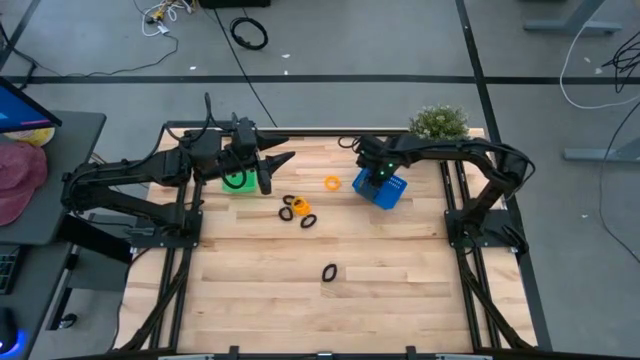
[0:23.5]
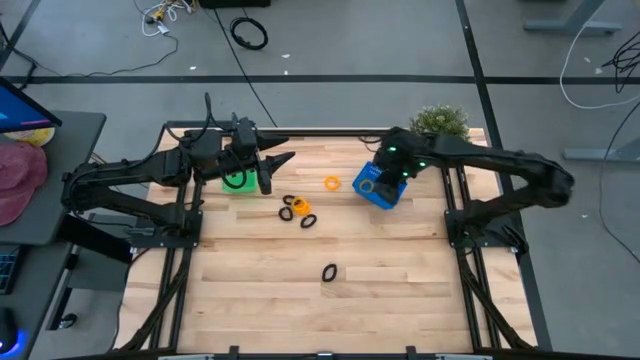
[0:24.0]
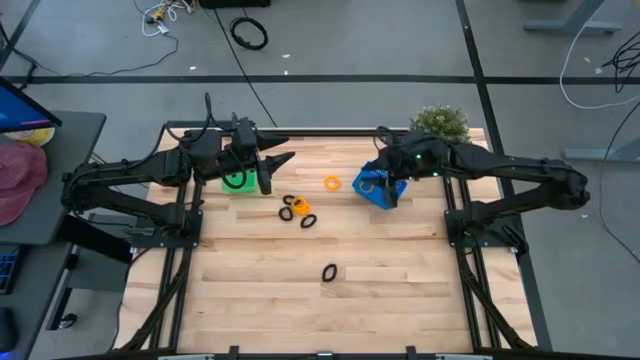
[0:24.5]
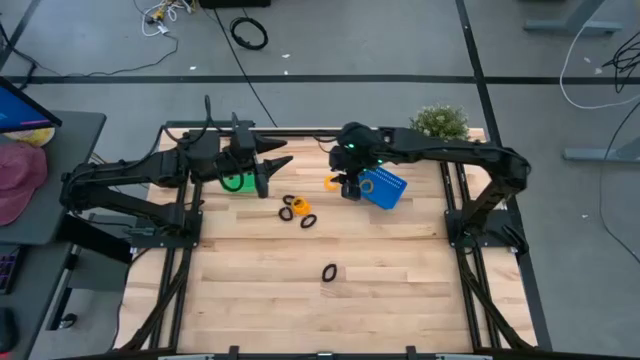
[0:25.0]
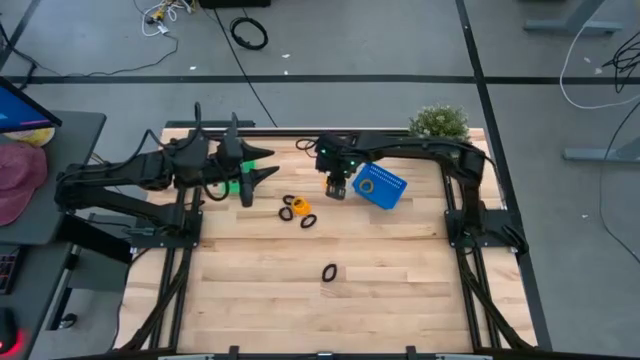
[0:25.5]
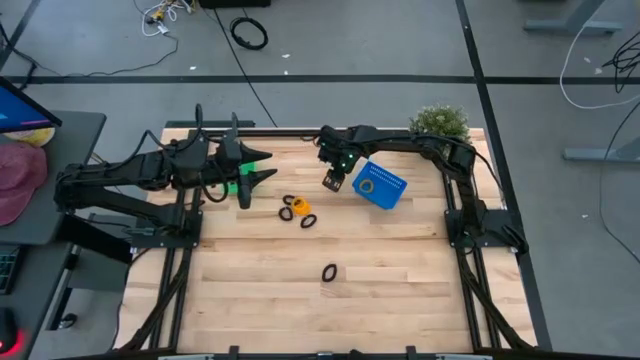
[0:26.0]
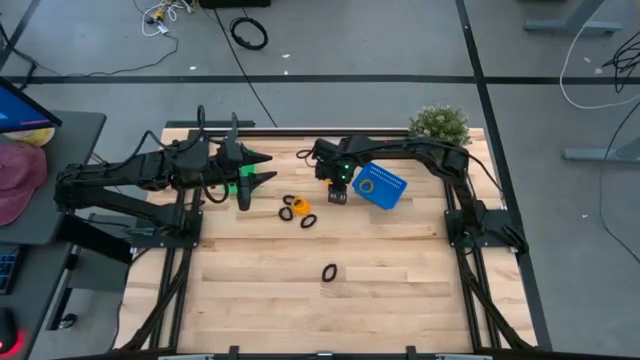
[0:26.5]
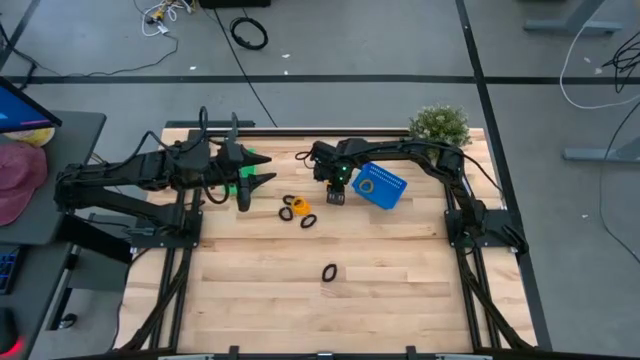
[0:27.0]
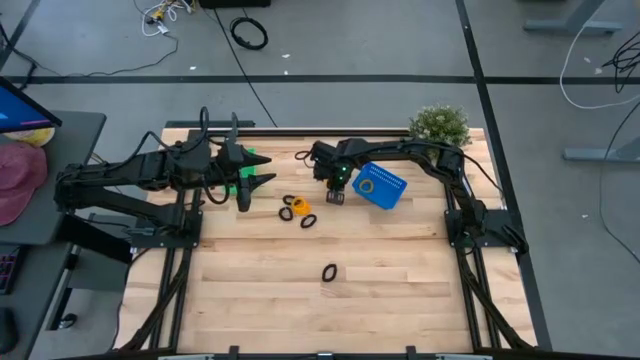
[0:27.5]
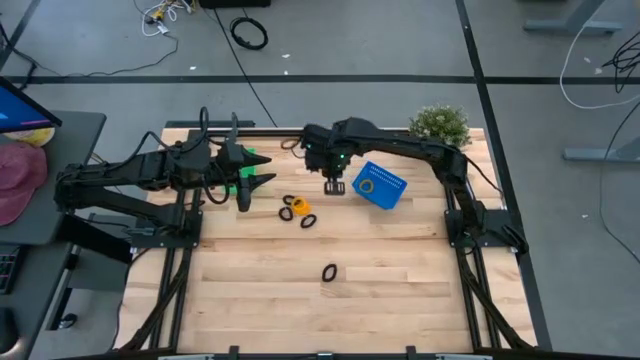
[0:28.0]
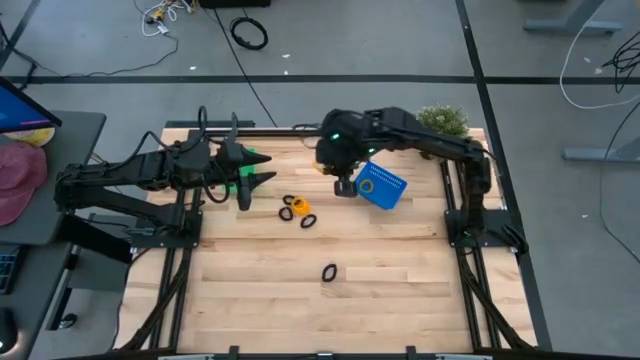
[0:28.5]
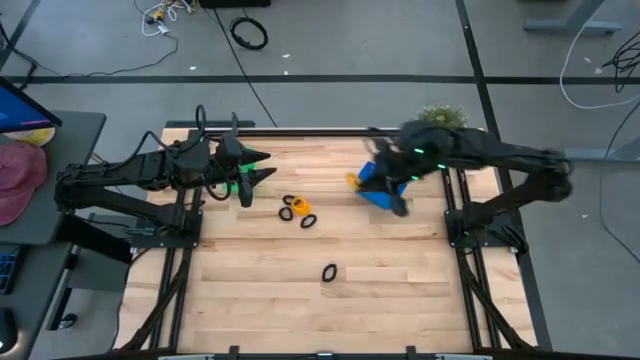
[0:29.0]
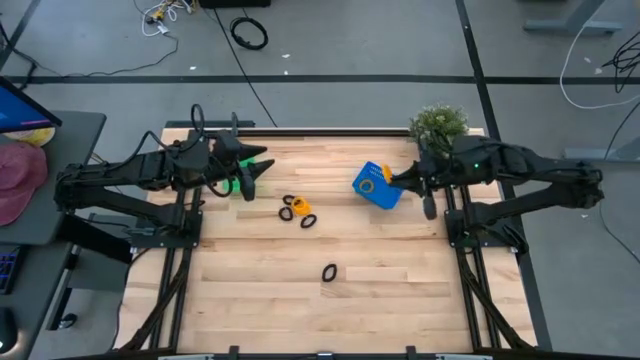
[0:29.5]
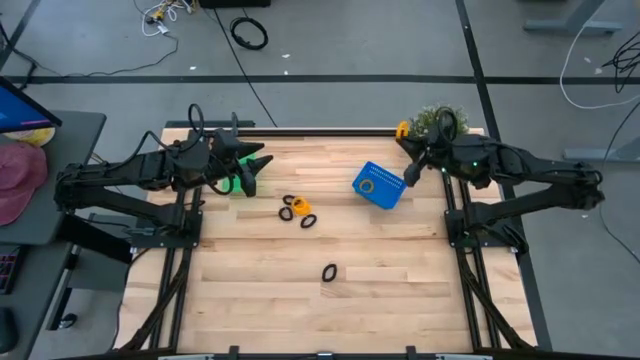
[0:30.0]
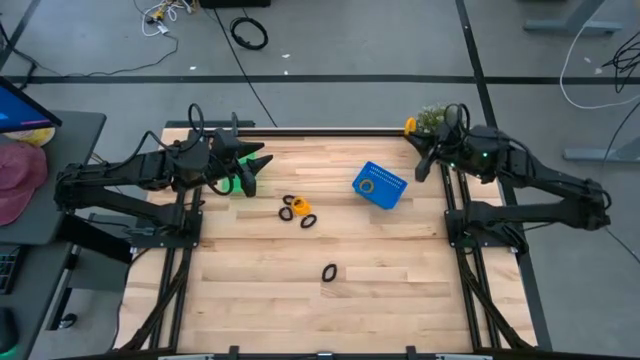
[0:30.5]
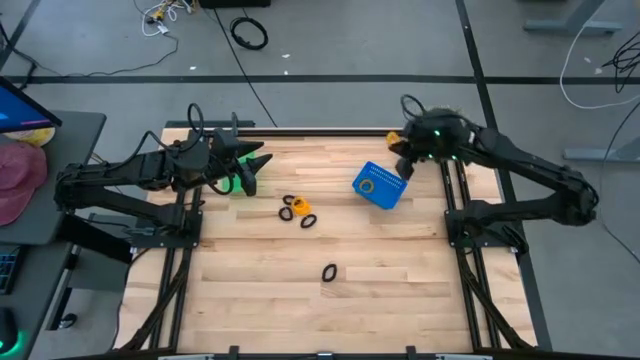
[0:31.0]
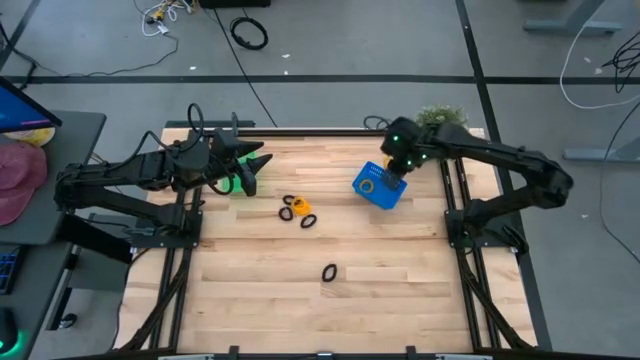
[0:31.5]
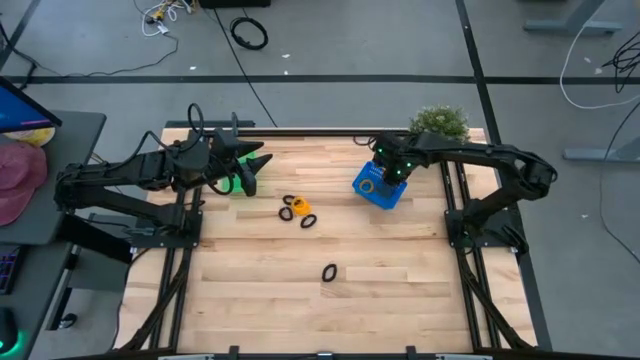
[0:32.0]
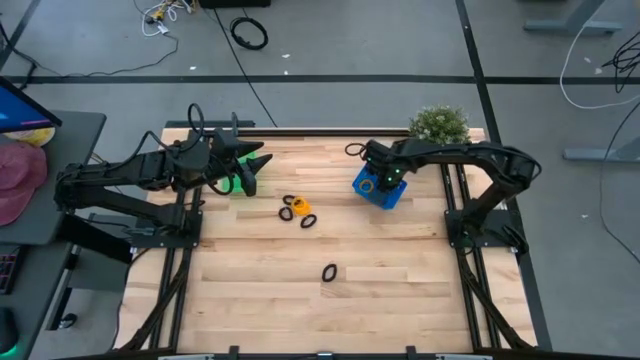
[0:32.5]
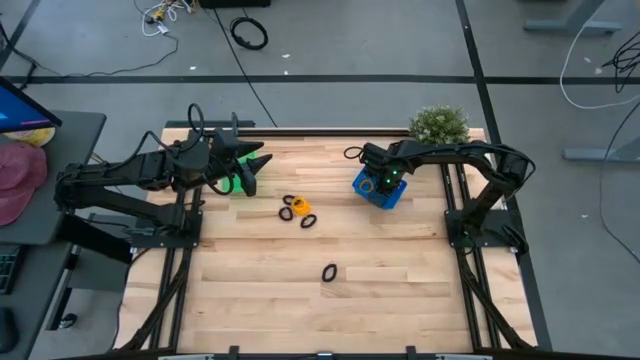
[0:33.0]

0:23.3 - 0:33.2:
Task: Sort spring keychains
Put the yellow spring keychain into the blue bin

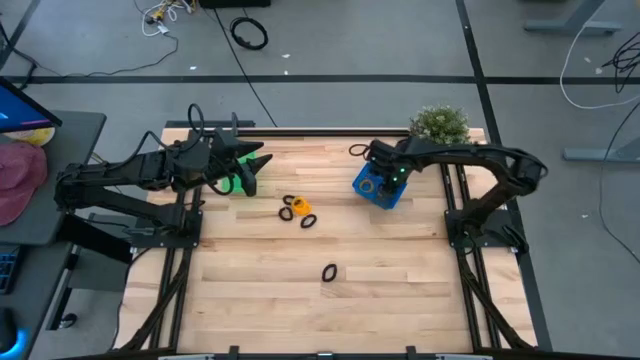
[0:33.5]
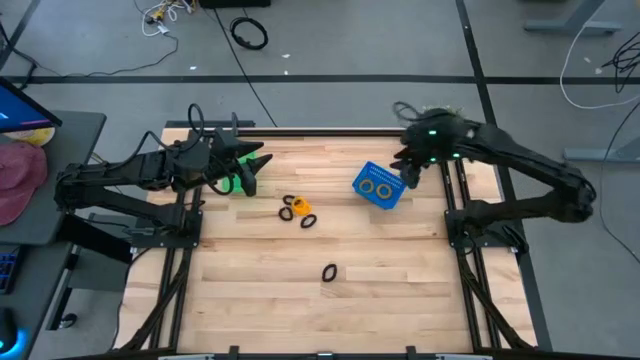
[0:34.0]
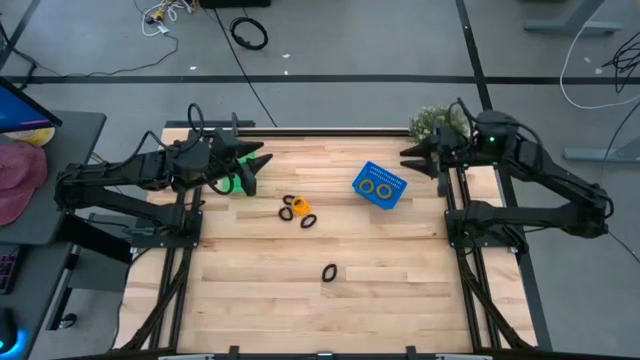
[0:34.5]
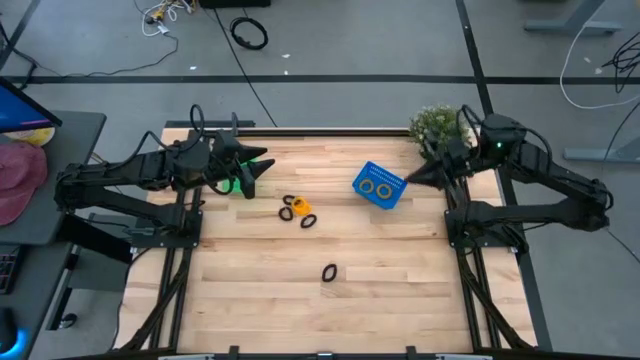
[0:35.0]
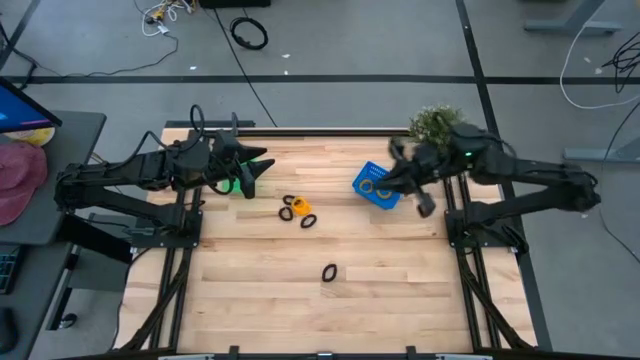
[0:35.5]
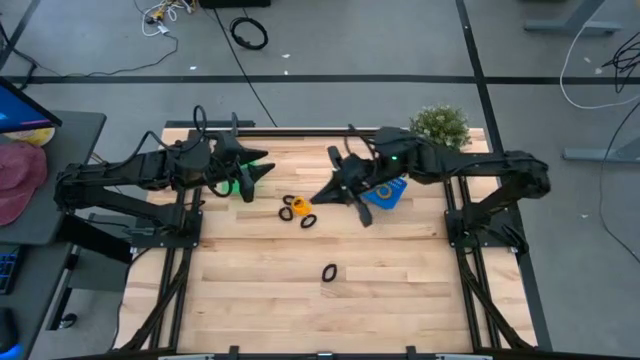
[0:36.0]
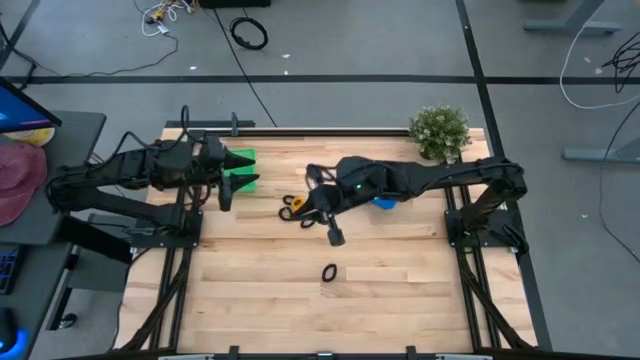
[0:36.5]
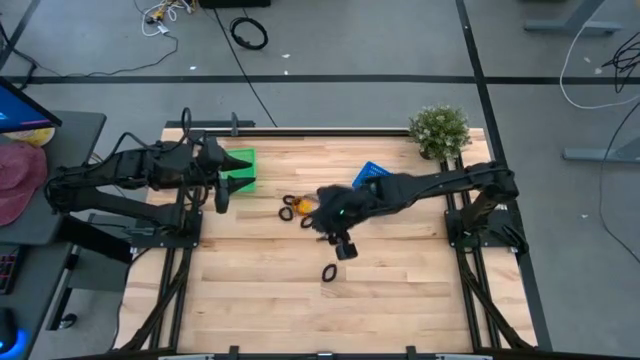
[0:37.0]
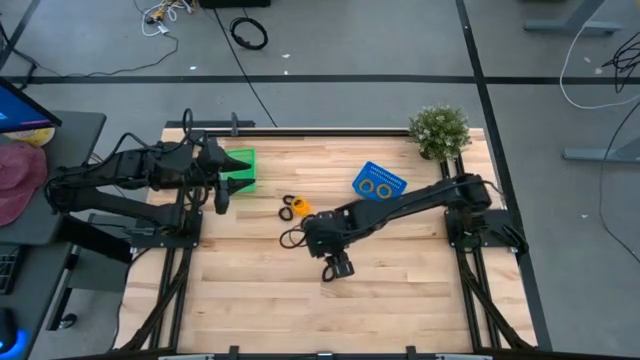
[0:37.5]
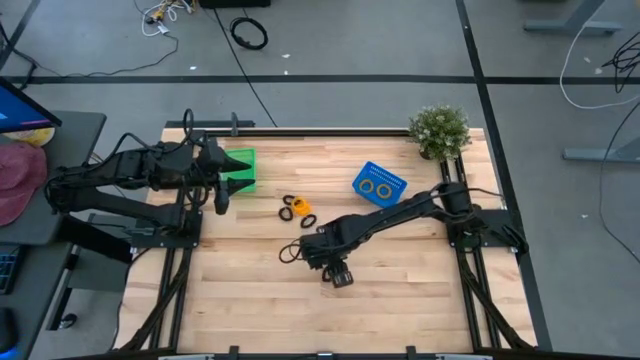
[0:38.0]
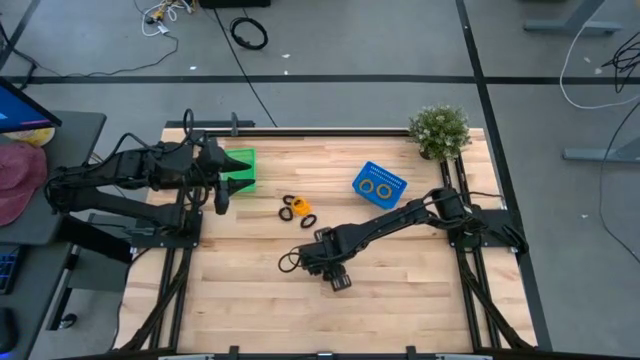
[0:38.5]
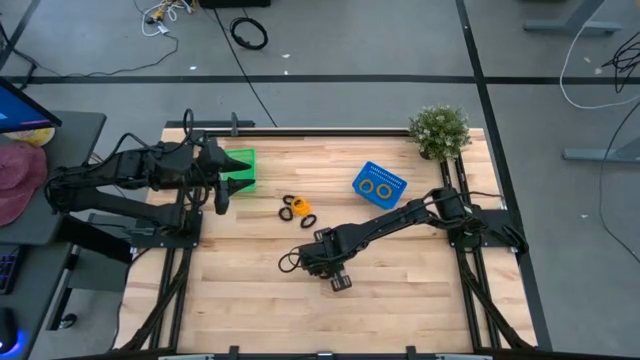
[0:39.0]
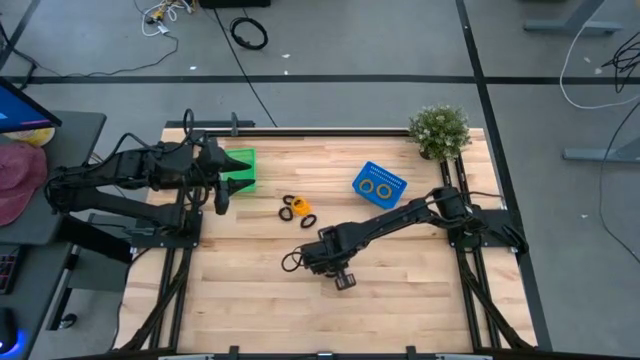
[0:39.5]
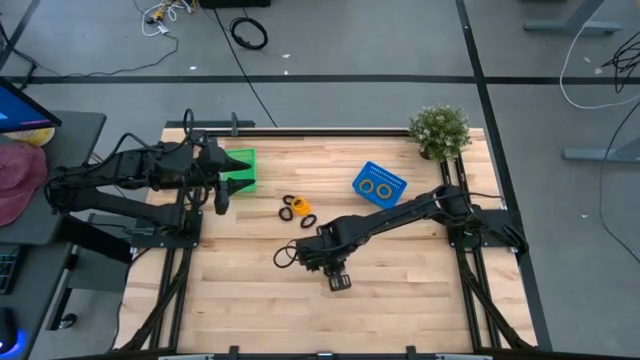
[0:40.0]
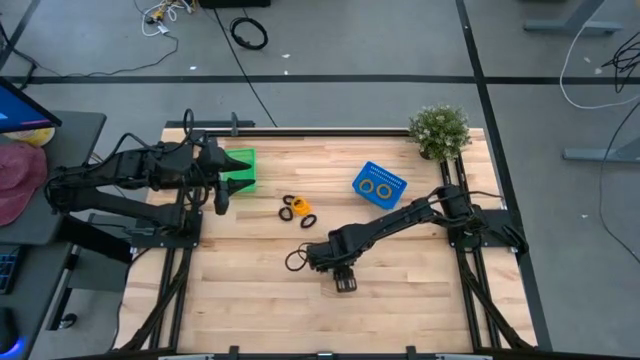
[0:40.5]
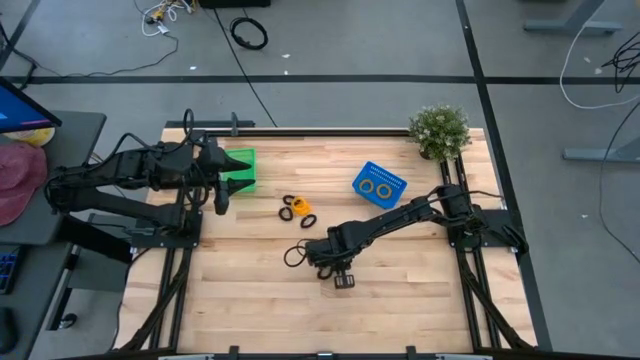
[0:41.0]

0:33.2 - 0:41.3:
Put the black spring keychain into the green bin

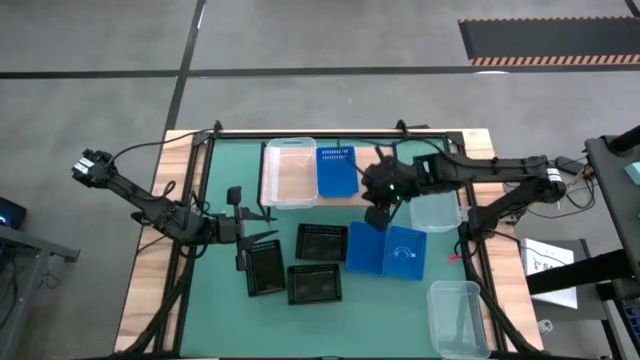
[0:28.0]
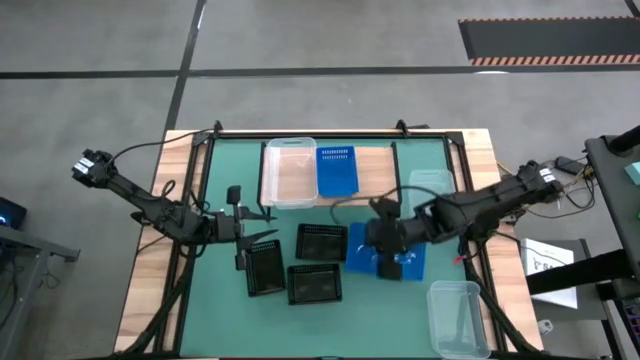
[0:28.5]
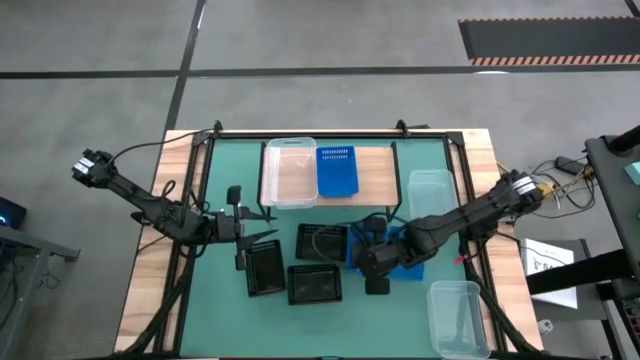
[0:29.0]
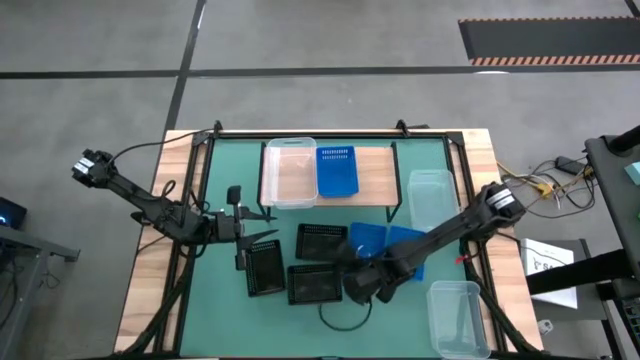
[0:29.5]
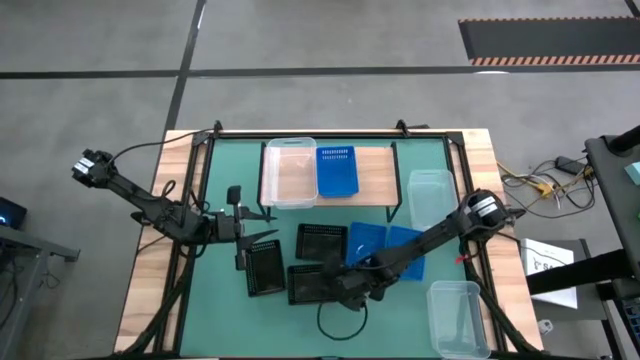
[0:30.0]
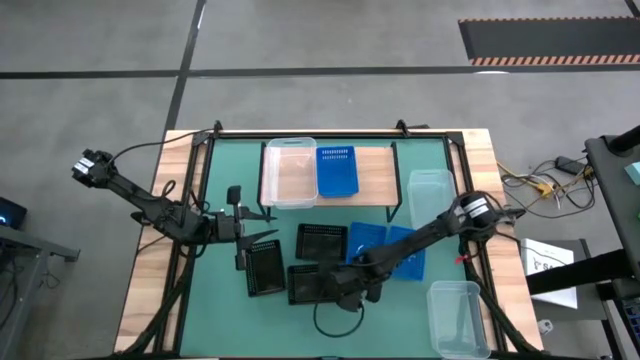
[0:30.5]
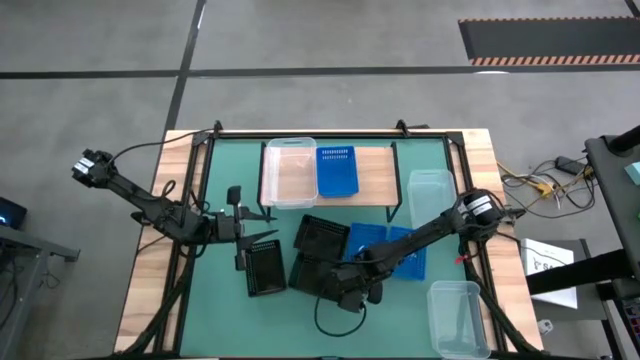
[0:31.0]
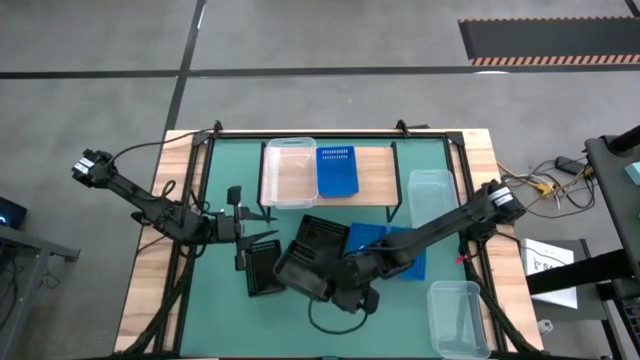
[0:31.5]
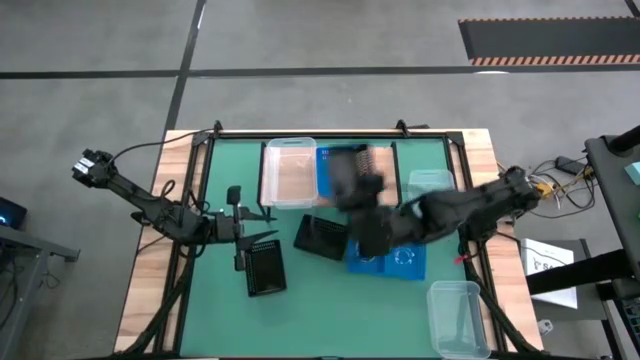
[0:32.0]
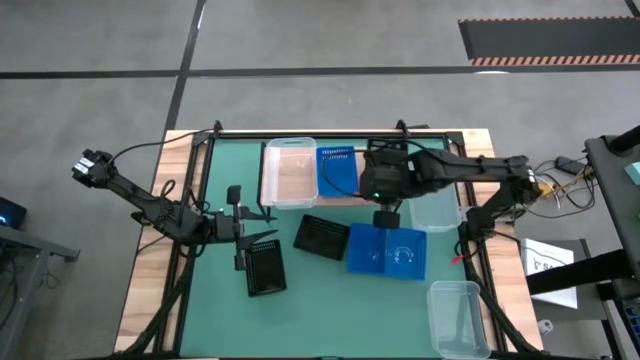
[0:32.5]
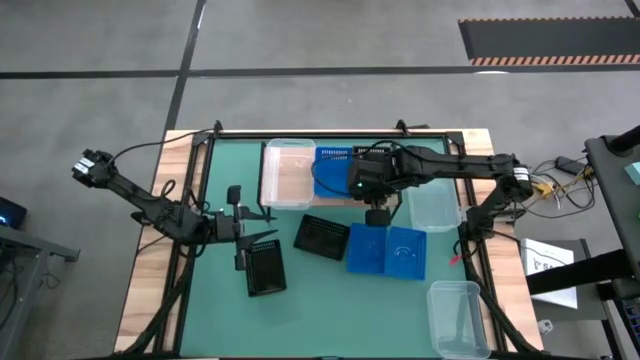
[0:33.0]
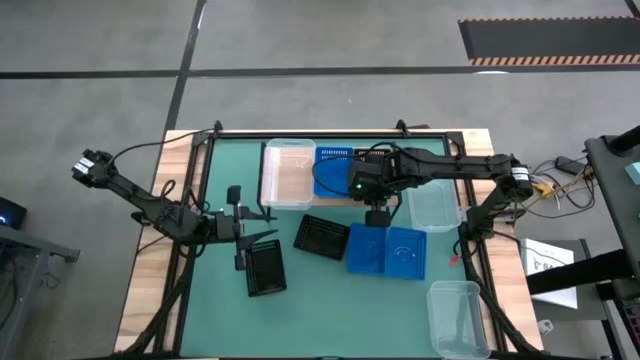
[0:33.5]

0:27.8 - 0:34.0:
Task: Stack baskets on shelf by color
Put the bottom black bin on the shelf
